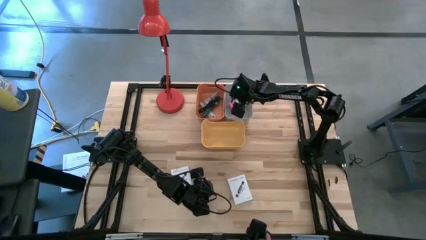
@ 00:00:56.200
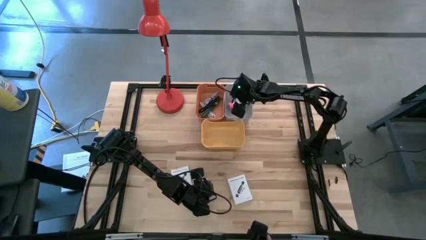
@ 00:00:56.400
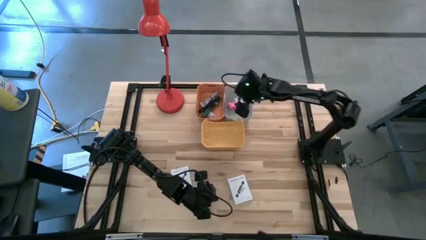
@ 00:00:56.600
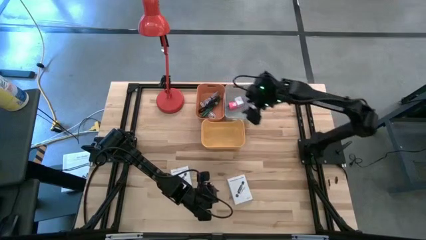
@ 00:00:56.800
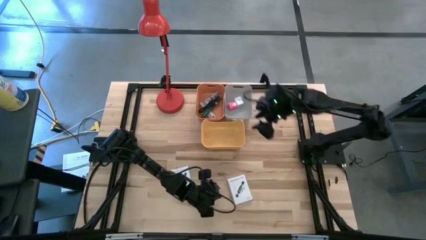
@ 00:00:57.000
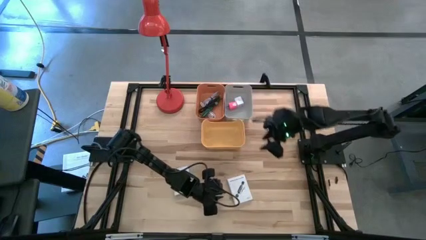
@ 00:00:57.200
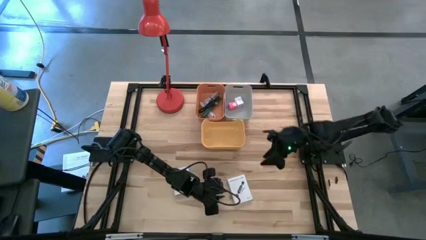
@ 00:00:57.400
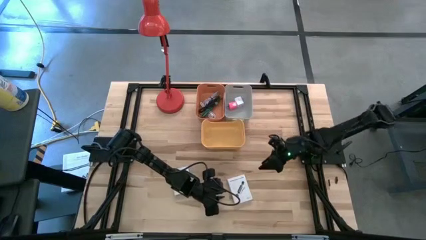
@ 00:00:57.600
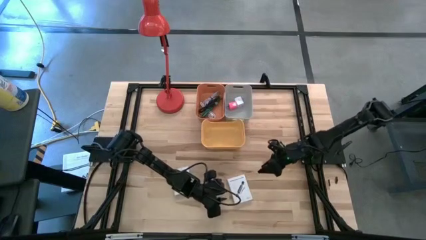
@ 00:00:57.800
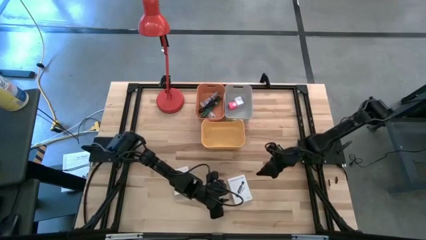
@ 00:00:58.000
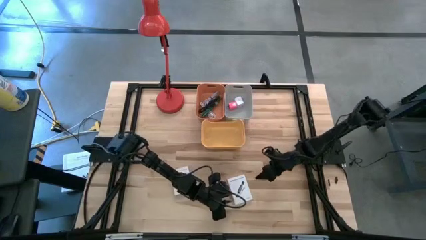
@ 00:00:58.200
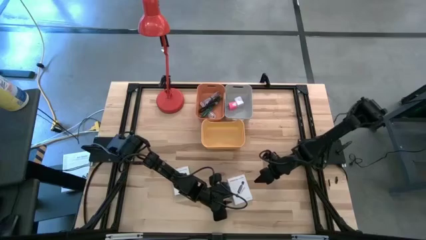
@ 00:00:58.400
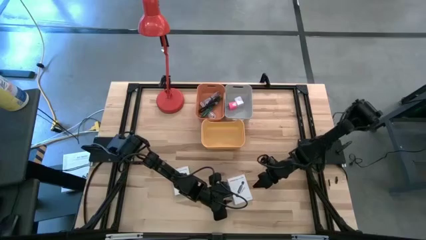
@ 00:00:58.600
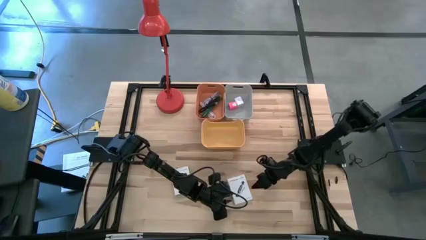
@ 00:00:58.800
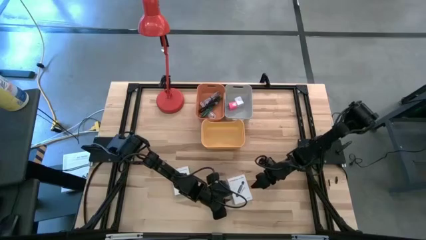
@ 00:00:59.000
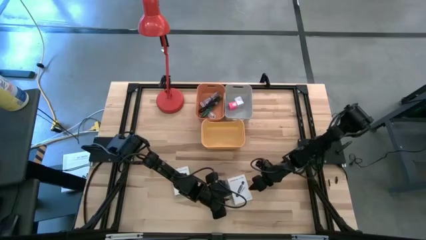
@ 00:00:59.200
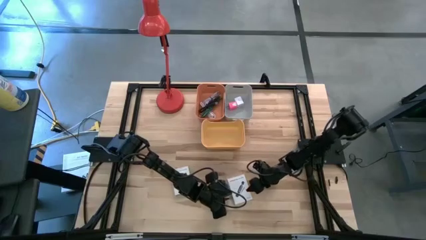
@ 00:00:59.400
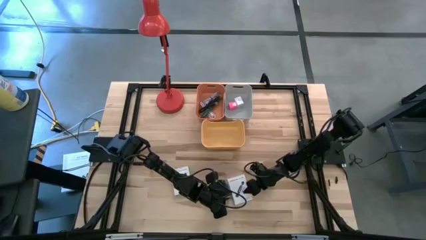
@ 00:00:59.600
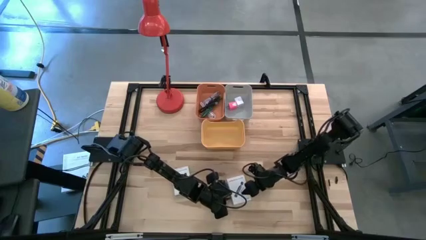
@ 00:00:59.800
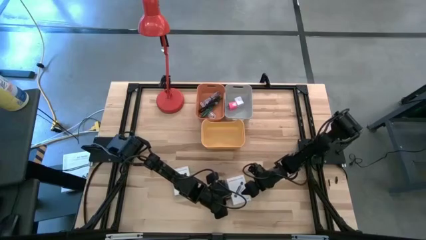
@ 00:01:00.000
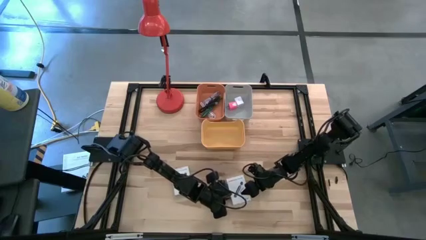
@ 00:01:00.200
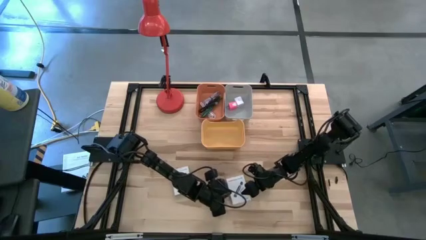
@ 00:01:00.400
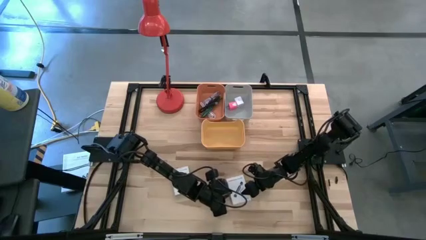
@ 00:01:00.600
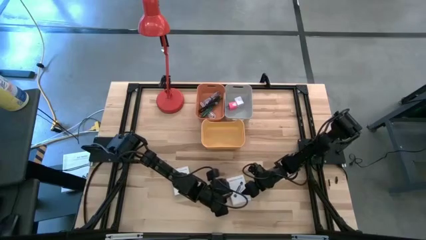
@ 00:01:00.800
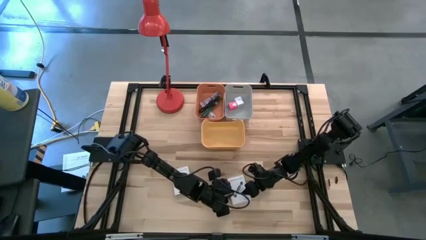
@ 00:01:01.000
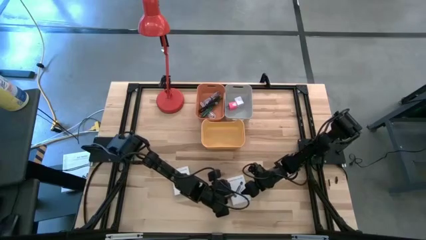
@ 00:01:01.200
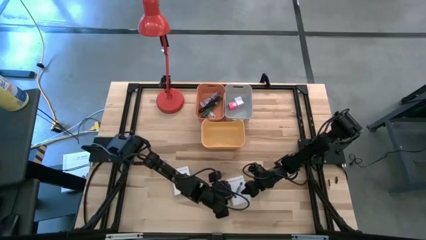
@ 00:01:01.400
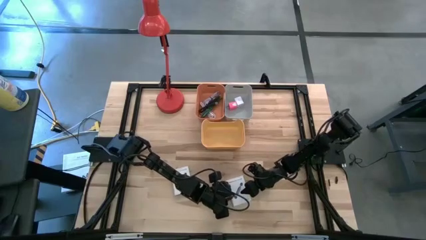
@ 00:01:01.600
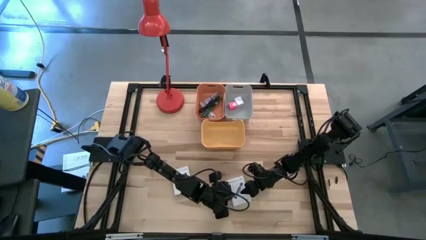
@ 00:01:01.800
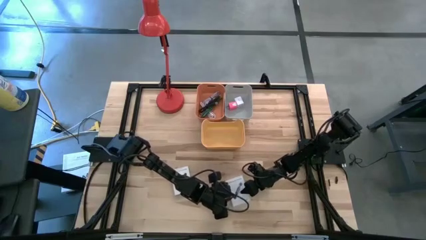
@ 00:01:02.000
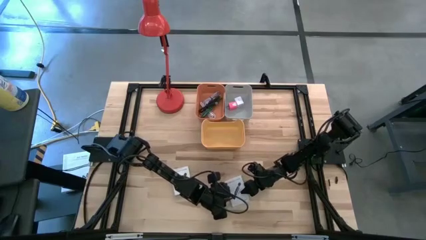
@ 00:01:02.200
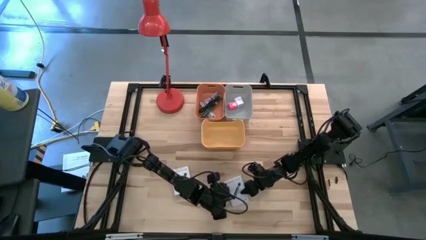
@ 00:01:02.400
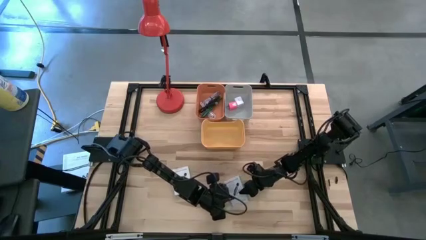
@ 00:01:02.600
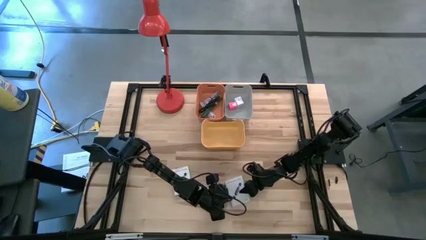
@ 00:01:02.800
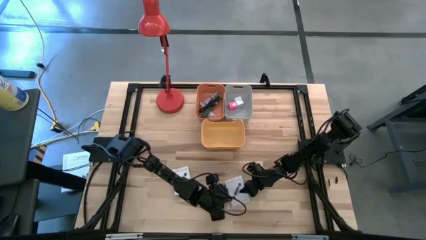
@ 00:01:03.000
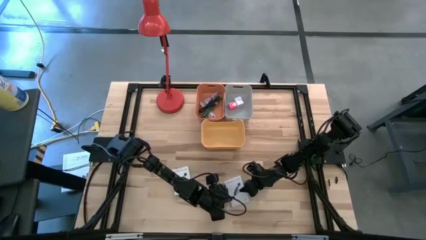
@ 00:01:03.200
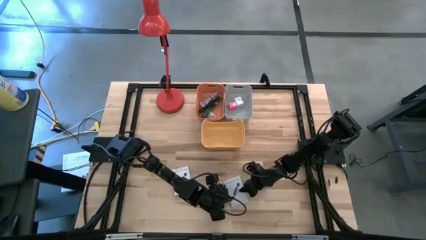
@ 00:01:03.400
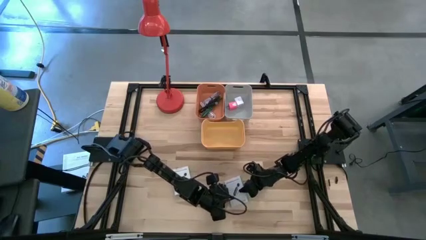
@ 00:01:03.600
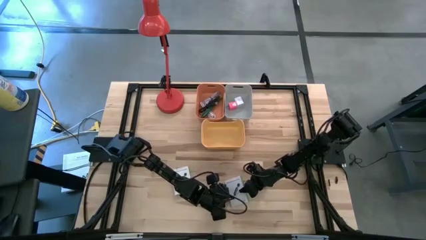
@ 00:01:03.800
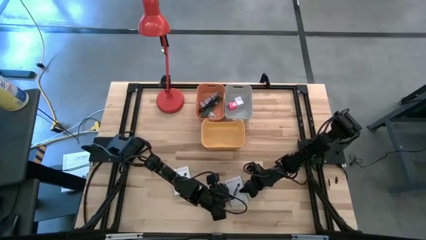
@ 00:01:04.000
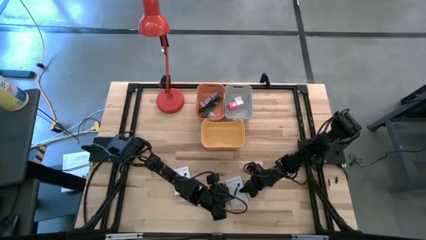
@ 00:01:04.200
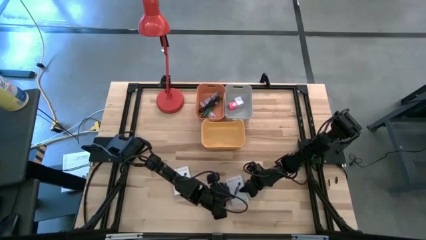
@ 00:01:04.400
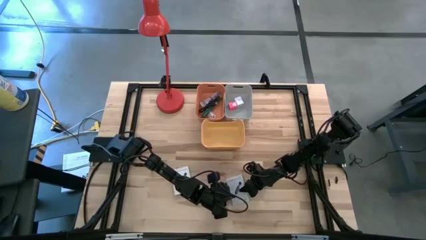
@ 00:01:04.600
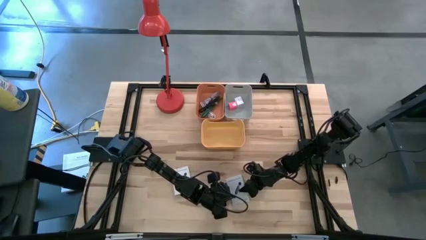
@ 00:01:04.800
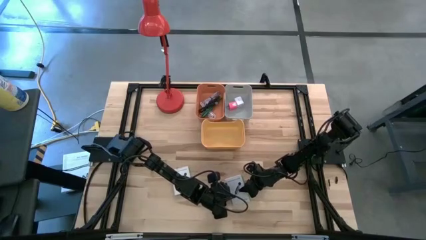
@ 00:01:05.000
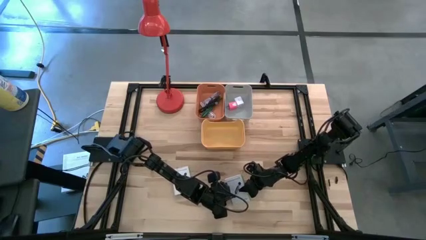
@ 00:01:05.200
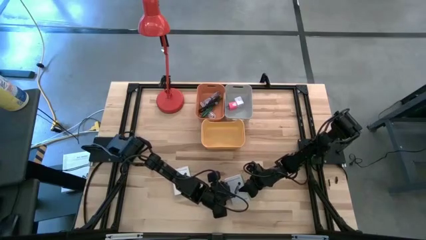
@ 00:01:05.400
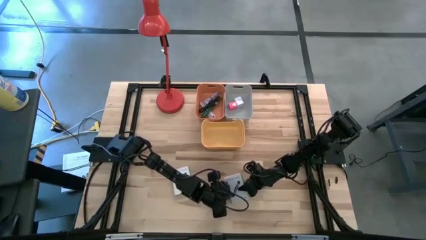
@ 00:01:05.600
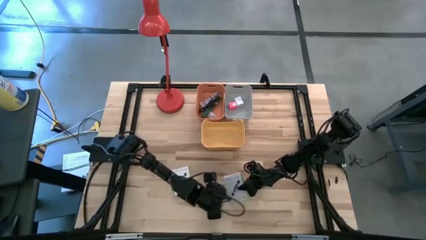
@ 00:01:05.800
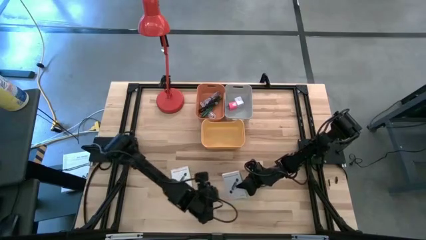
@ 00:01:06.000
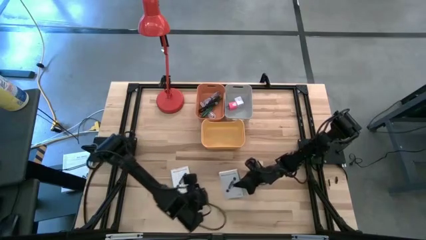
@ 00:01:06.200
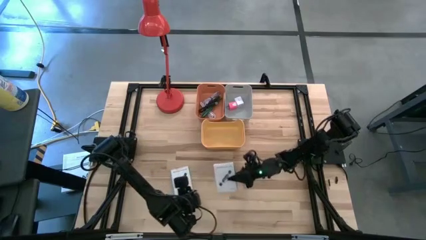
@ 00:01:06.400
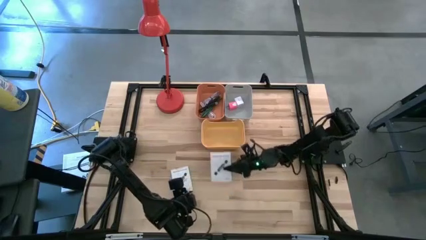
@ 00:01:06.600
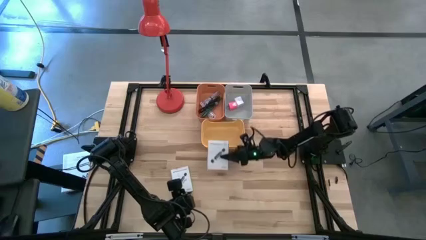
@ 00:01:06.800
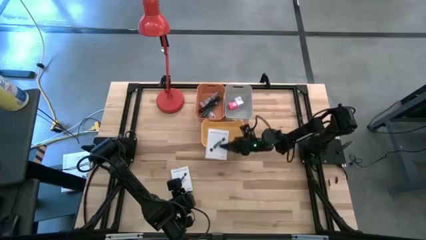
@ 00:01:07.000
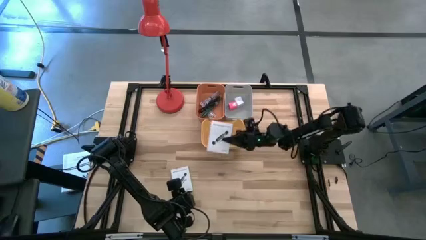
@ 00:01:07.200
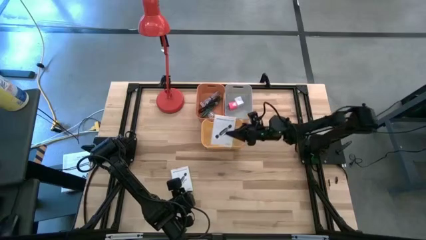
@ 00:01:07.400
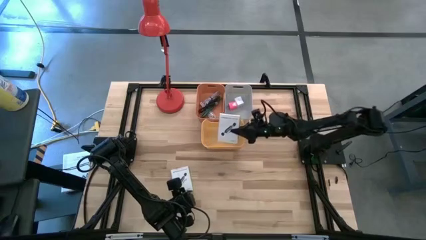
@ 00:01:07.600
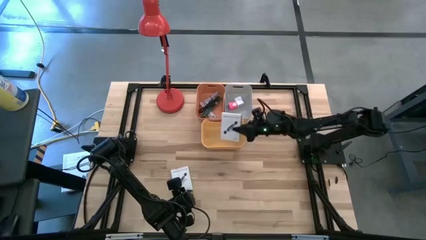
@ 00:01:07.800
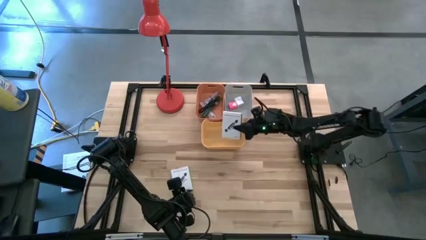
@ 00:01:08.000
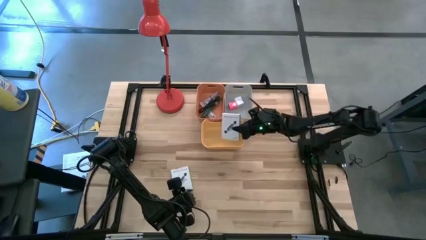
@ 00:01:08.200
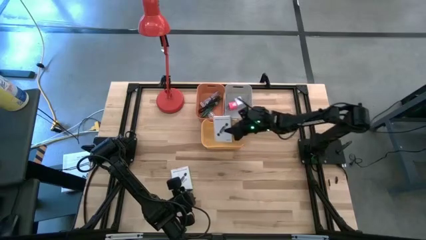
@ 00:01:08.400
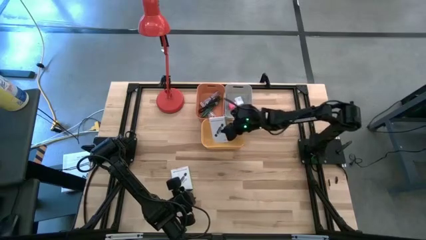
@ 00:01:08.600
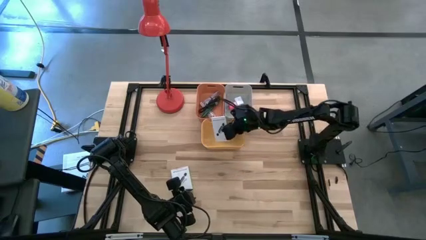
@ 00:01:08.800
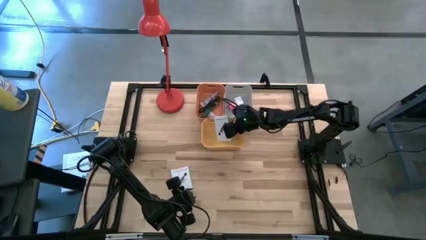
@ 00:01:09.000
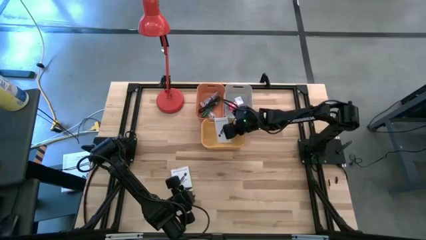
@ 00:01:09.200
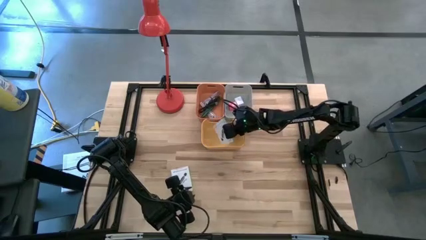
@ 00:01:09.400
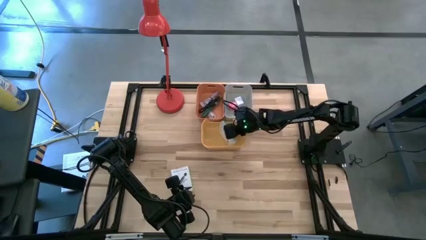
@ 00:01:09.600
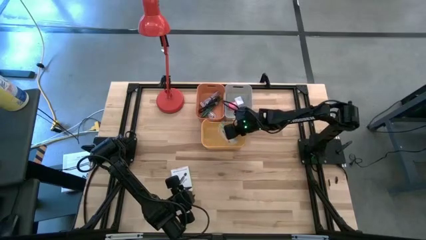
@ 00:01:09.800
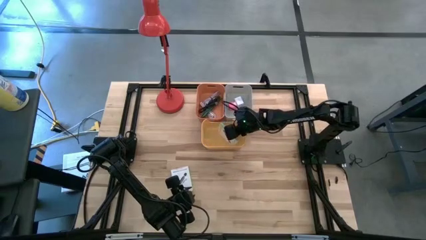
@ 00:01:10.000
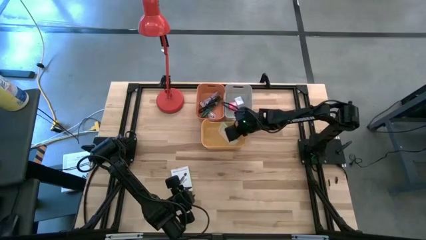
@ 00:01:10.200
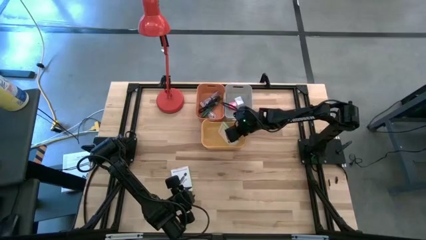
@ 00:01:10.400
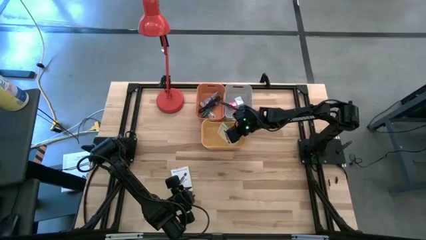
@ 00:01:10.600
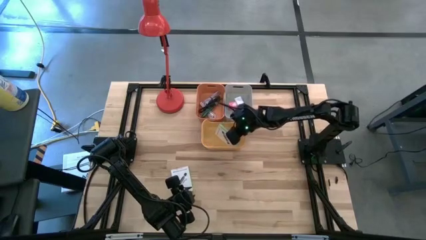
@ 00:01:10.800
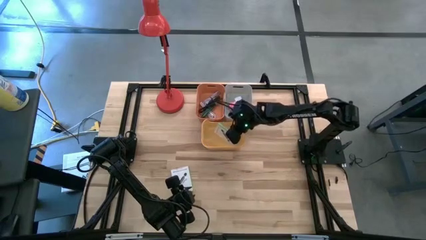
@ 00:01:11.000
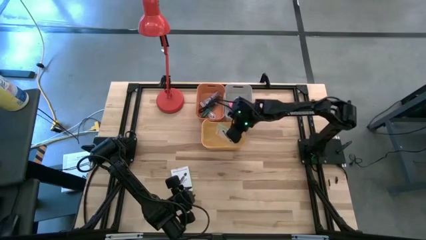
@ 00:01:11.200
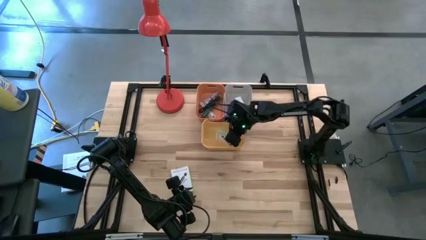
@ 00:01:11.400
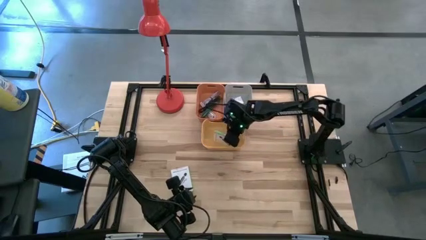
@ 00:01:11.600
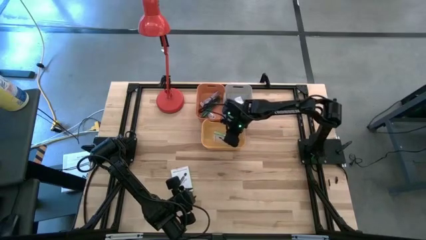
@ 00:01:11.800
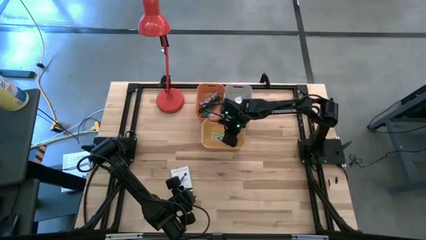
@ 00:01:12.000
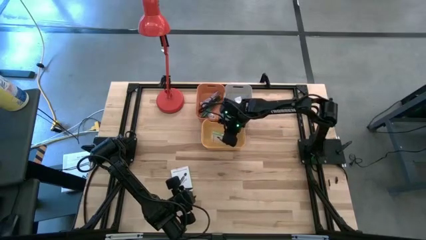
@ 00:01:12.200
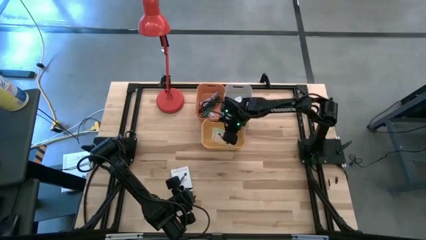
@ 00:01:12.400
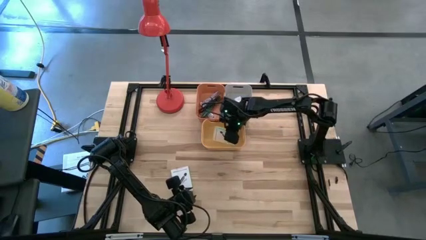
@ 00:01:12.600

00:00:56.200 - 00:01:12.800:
Task: Pick and place items into bin
Put the right card reader box into the yellow bin
